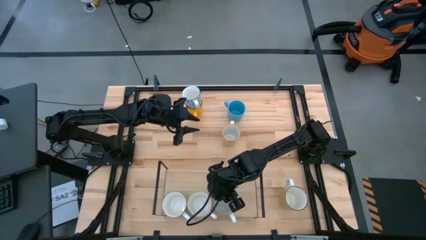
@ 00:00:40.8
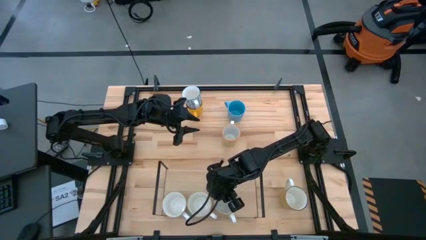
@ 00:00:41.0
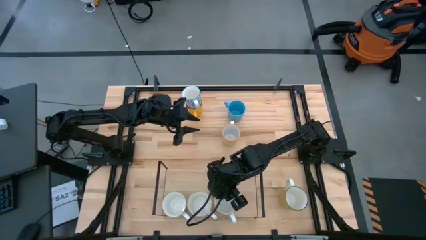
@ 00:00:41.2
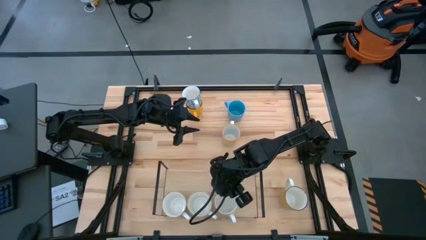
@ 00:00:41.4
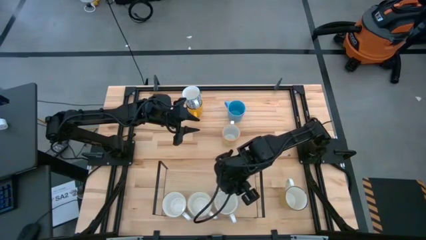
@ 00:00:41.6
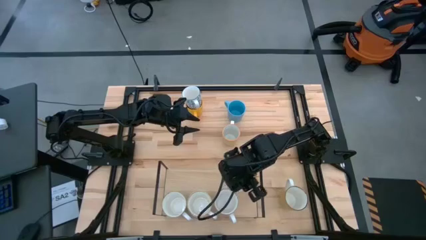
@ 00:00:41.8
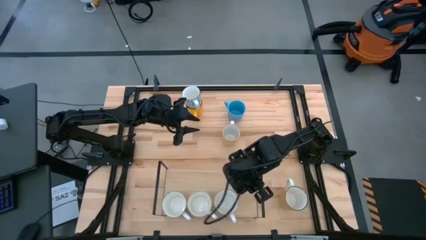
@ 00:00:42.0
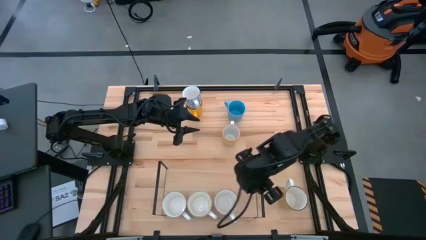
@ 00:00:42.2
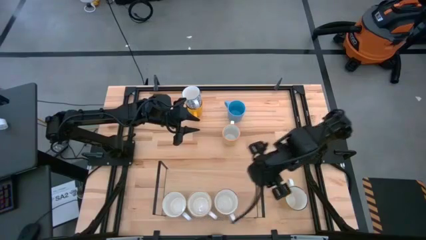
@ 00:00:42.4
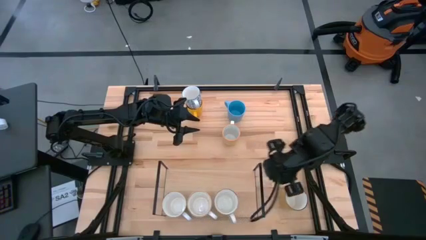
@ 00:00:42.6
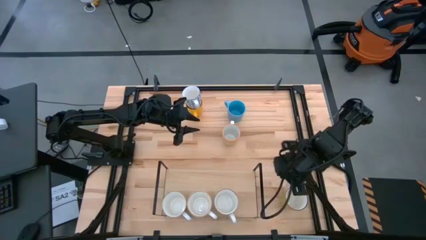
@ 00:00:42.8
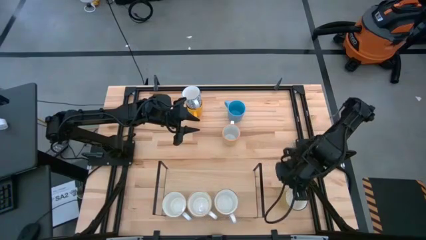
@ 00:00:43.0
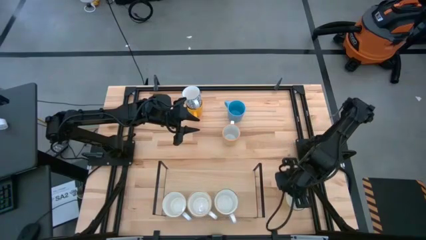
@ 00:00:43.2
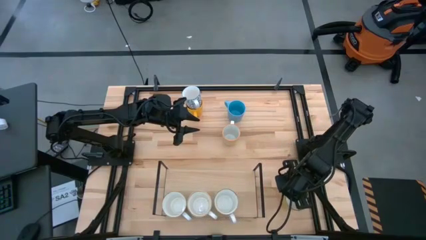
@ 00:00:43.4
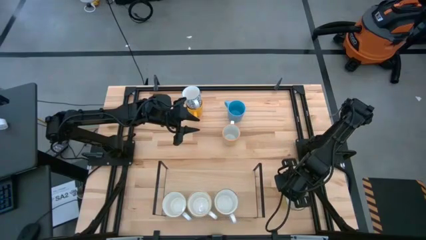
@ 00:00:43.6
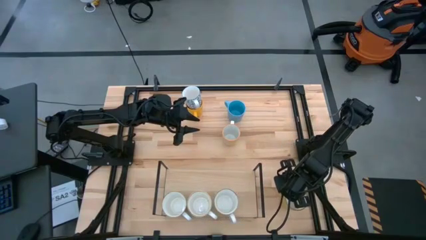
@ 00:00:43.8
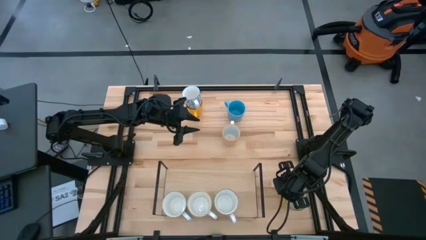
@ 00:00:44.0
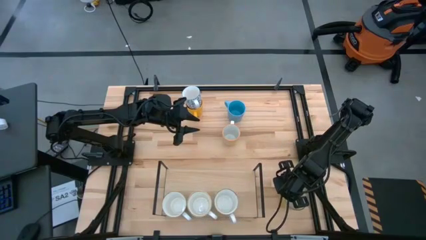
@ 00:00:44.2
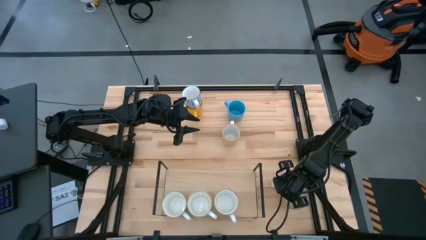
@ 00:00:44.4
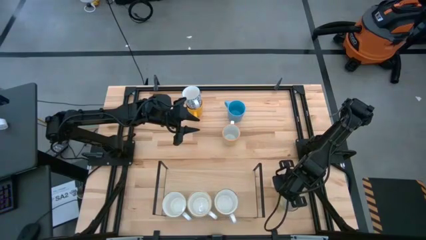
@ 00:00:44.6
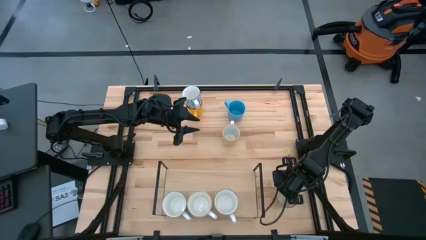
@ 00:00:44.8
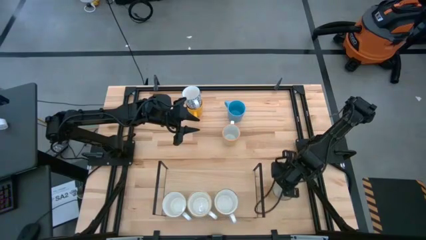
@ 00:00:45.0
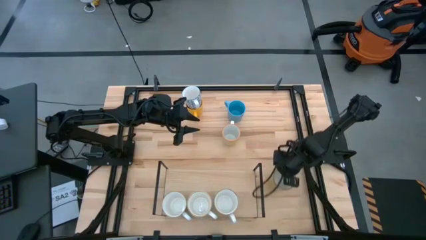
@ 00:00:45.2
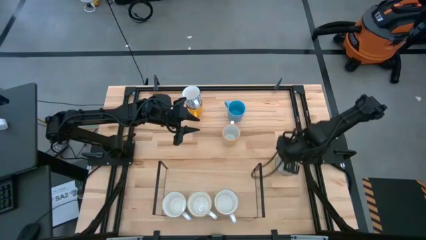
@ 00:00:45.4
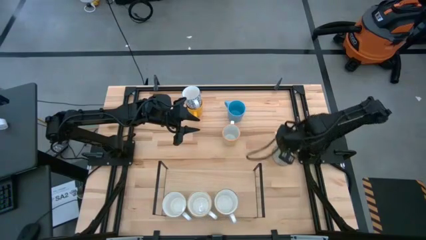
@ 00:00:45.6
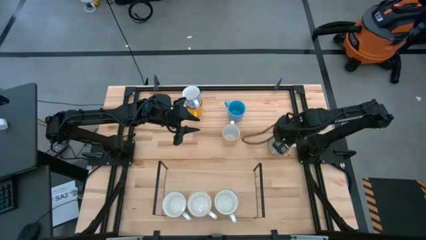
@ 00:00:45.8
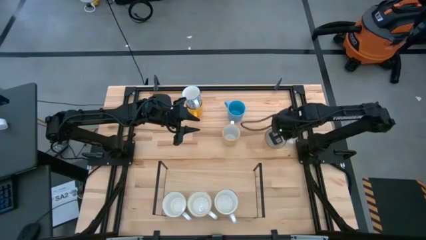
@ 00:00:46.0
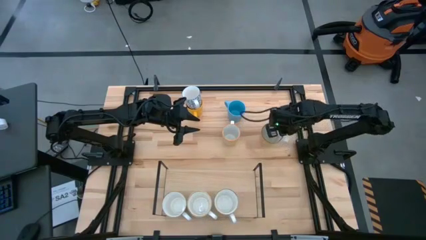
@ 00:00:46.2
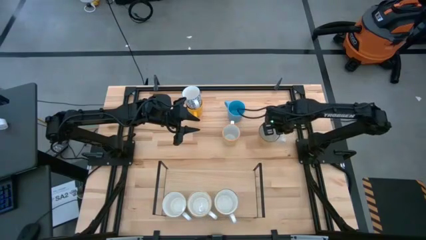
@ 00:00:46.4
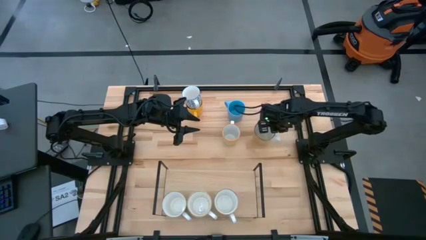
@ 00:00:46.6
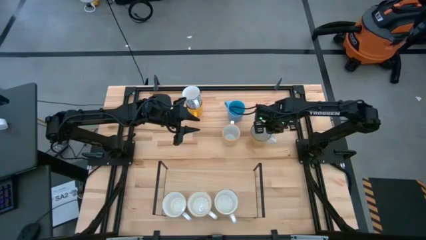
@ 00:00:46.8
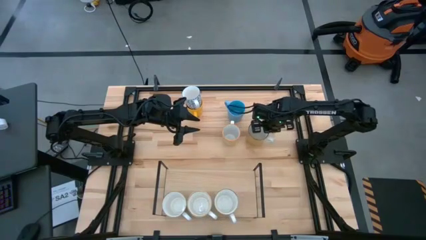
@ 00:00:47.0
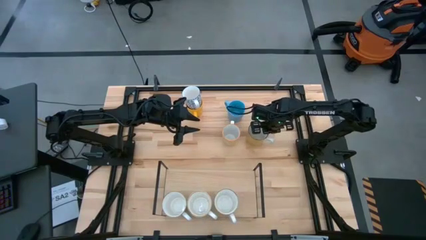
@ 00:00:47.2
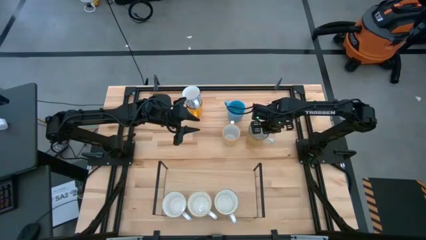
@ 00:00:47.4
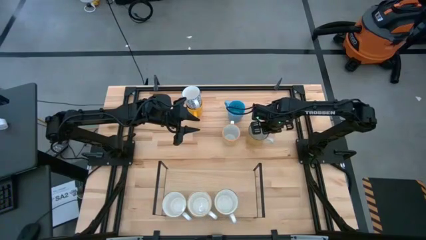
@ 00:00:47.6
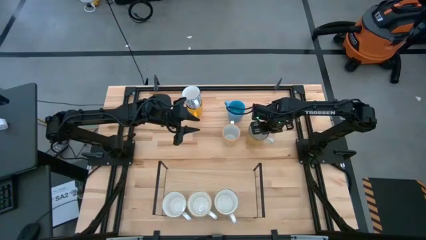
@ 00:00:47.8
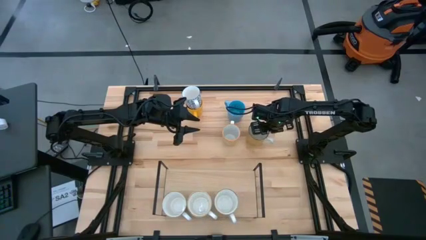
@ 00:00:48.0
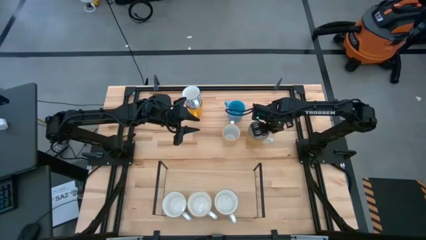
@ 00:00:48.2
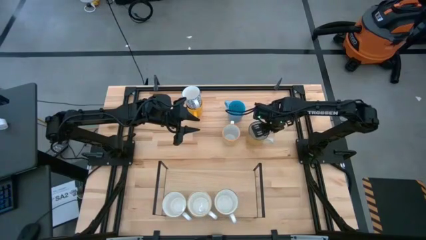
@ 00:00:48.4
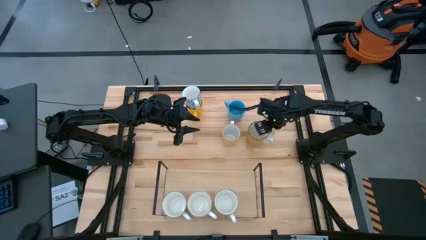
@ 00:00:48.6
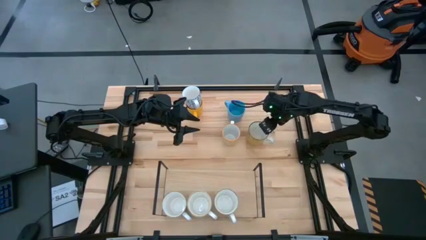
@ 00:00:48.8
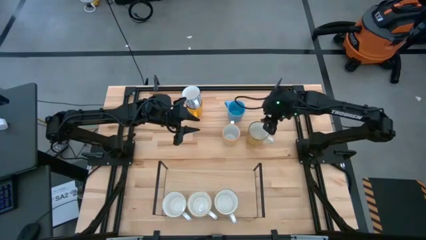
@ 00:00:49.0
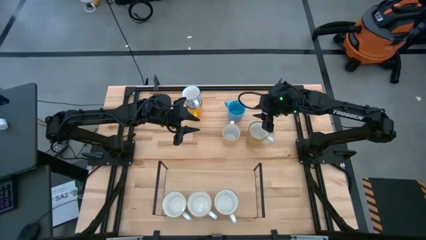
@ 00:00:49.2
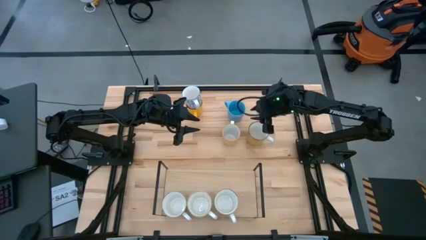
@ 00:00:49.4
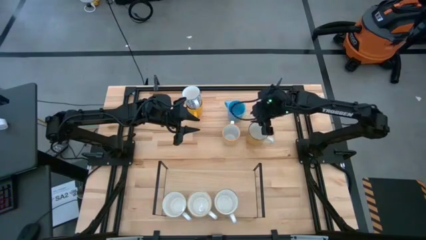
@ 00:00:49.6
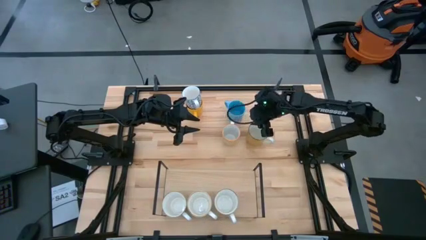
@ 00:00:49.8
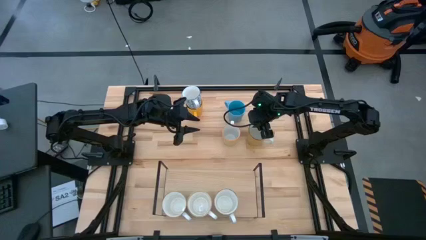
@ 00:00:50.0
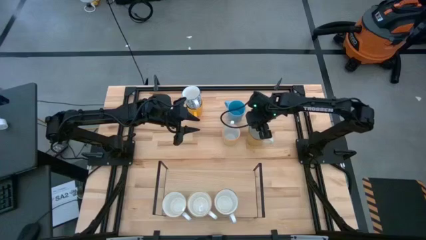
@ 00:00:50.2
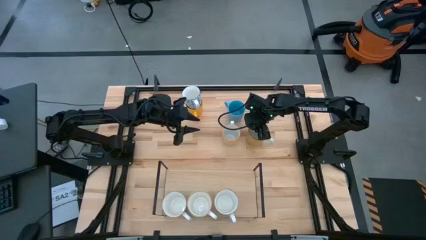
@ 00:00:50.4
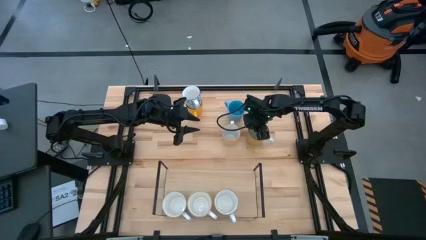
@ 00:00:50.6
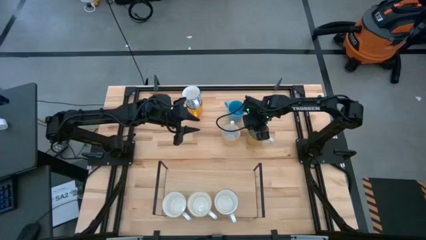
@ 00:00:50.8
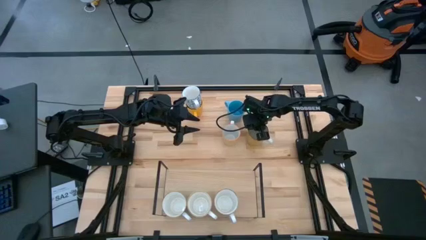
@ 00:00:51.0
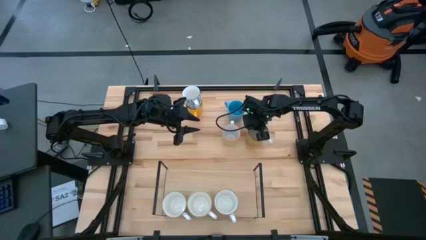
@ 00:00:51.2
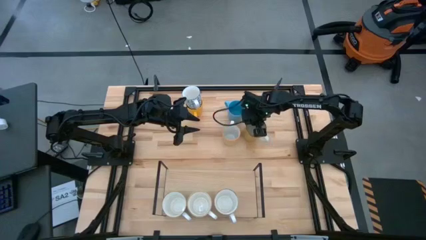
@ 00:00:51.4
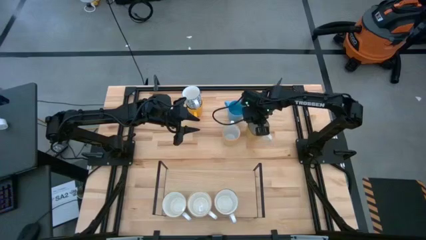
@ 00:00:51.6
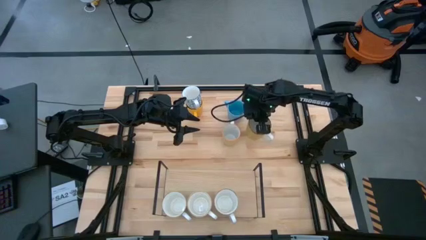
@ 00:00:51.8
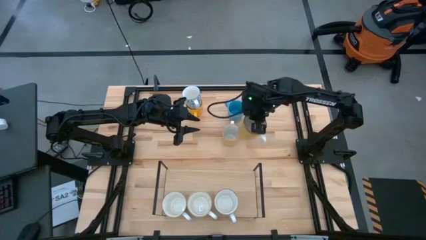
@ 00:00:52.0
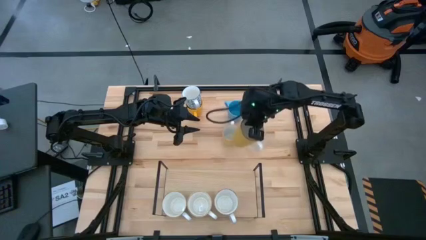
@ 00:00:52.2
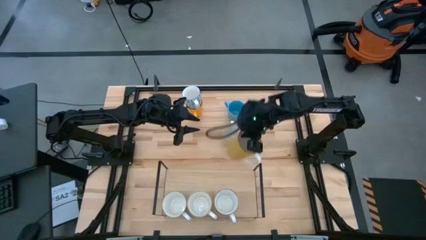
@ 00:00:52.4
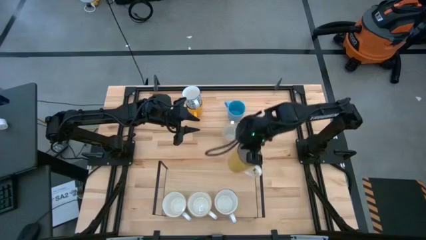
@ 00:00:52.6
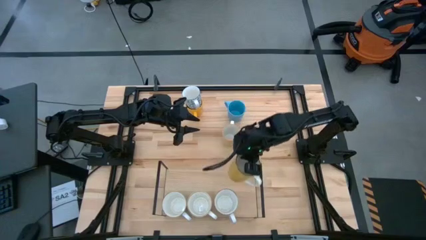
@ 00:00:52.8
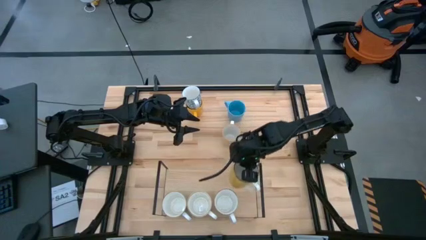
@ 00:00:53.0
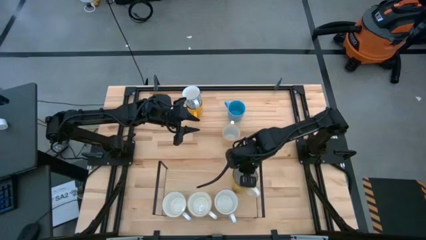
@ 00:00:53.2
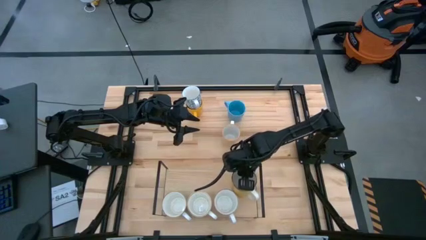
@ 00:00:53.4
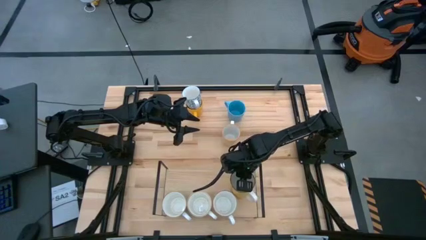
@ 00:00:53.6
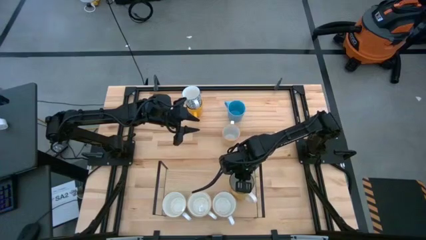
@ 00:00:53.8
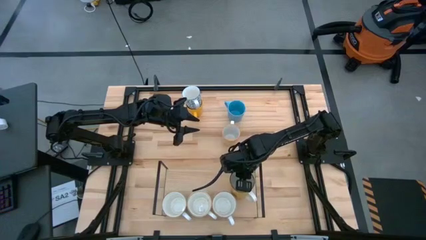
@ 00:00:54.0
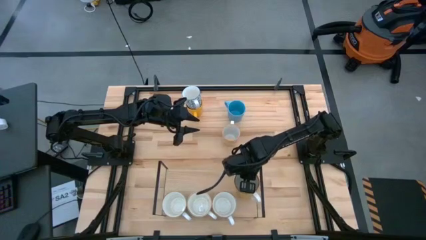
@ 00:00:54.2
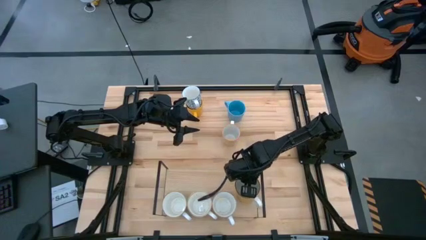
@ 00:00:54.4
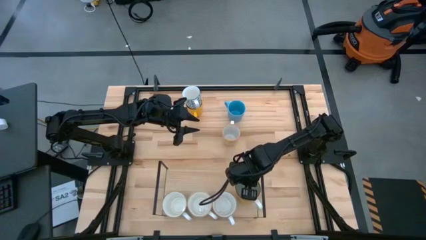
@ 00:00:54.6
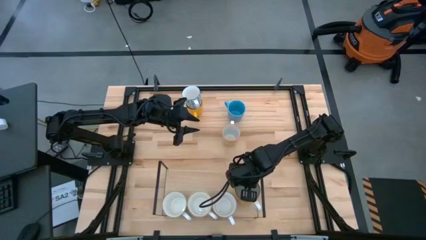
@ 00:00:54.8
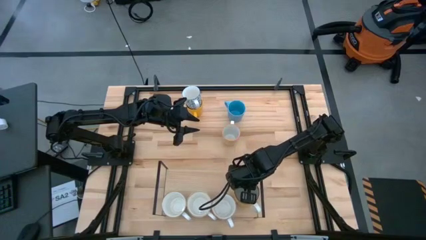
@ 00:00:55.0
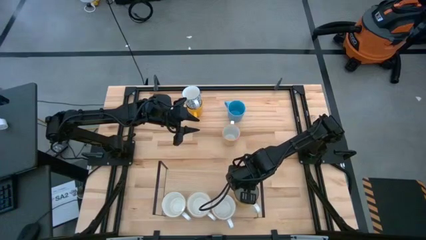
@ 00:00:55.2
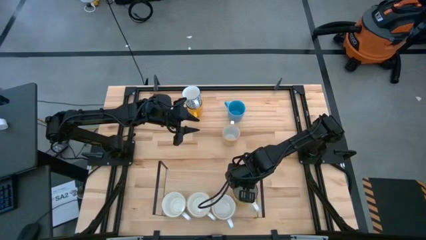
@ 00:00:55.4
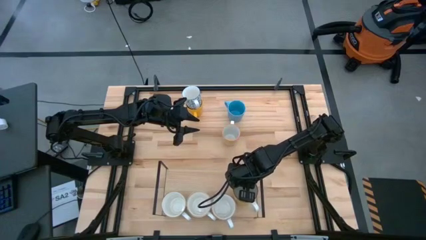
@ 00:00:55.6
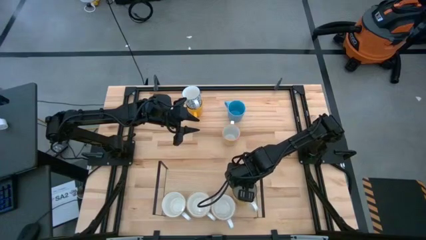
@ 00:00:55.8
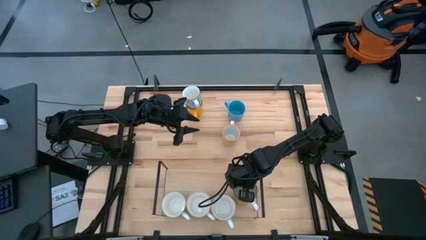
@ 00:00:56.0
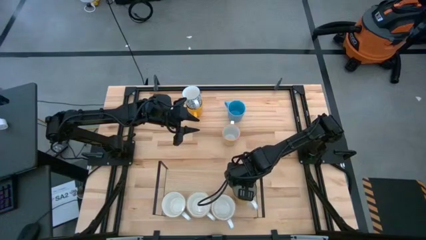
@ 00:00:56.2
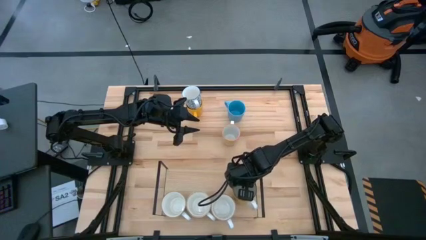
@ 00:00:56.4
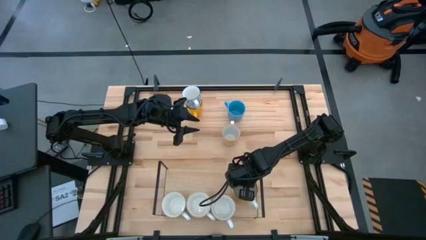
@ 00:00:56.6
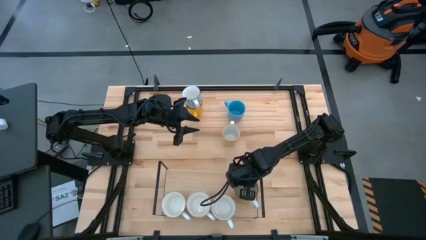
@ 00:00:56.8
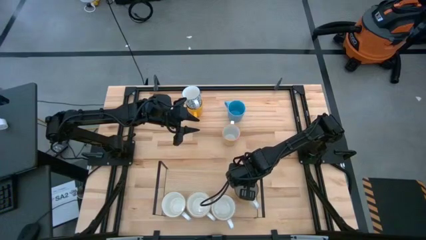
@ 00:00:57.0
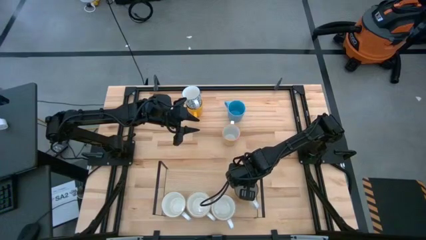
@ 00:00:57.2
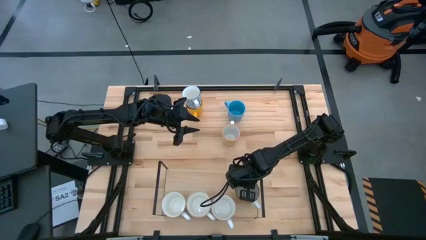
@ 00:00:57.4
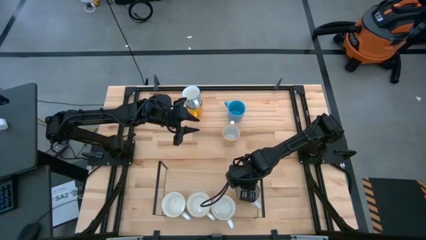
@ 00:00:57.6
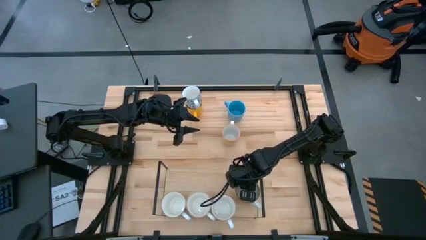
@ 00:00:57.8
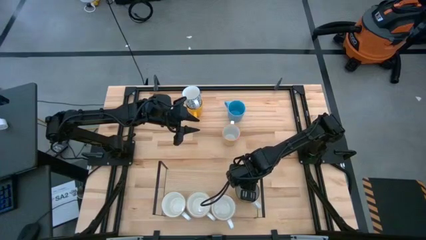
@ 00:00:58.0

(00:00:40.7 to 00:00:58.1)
Task: Place coffee mugs
Put the light yellow mug on the shelf
